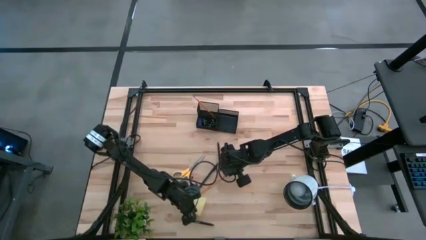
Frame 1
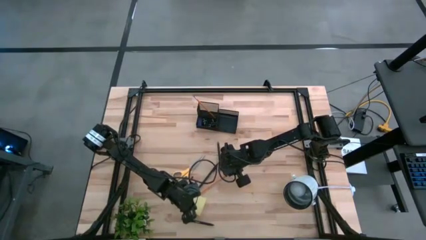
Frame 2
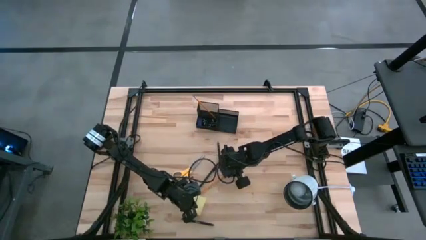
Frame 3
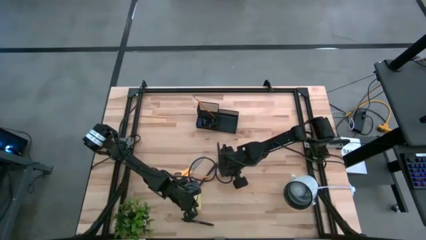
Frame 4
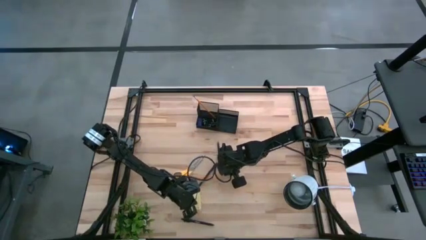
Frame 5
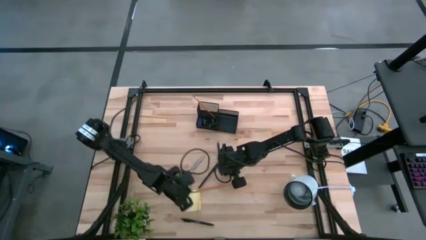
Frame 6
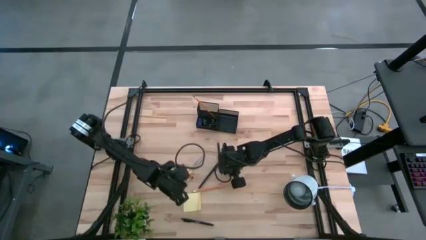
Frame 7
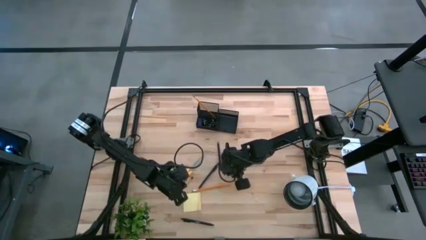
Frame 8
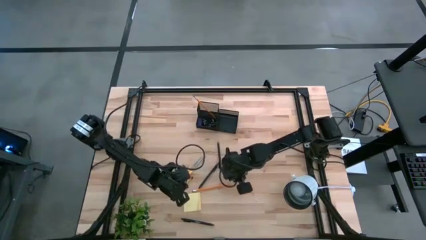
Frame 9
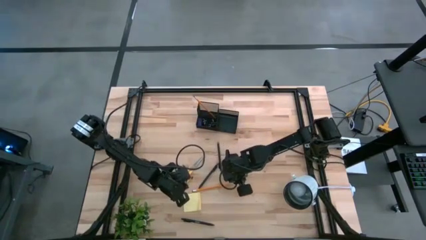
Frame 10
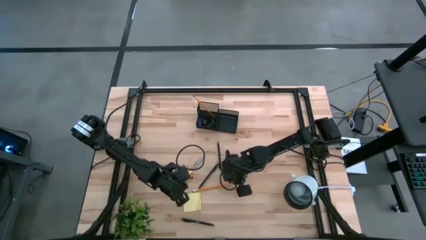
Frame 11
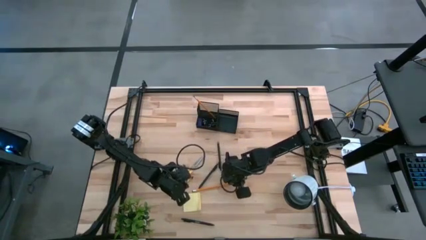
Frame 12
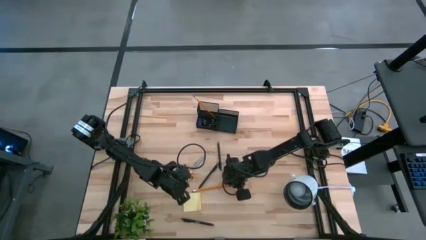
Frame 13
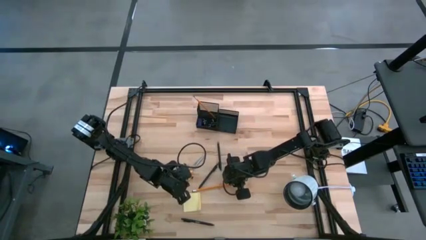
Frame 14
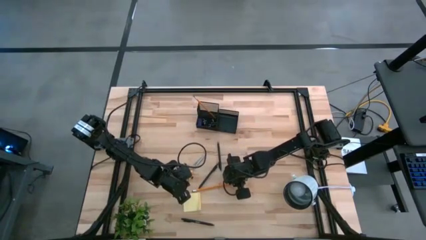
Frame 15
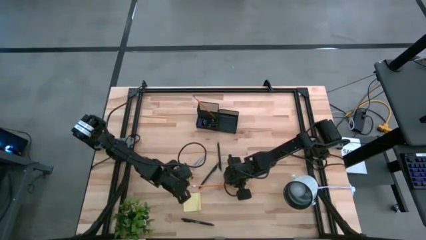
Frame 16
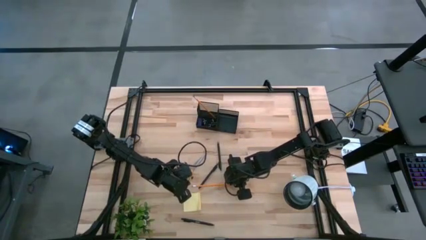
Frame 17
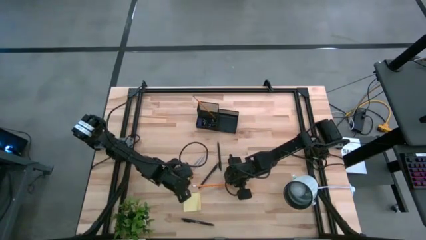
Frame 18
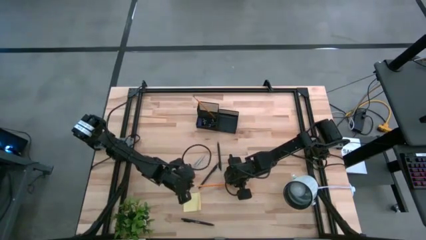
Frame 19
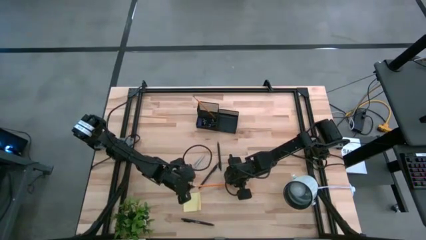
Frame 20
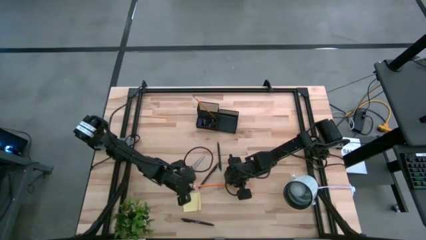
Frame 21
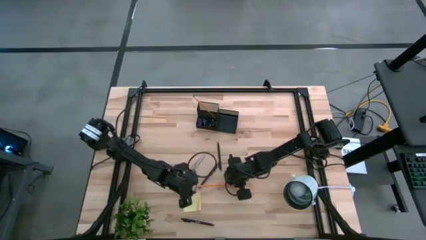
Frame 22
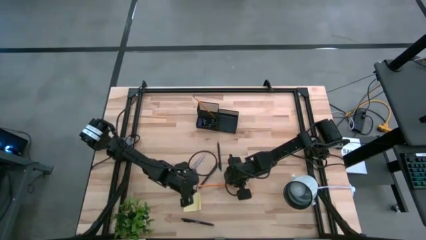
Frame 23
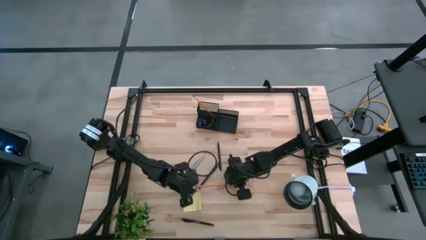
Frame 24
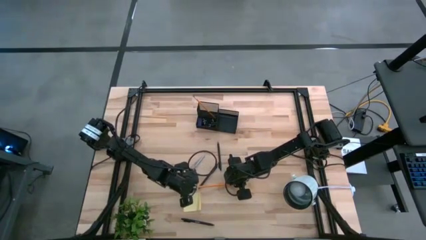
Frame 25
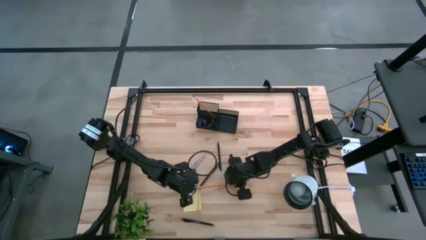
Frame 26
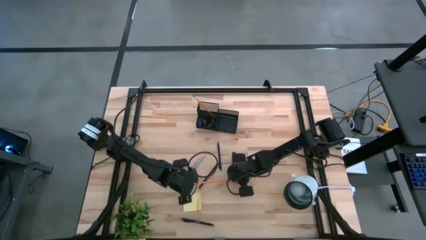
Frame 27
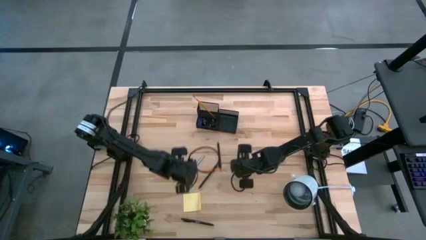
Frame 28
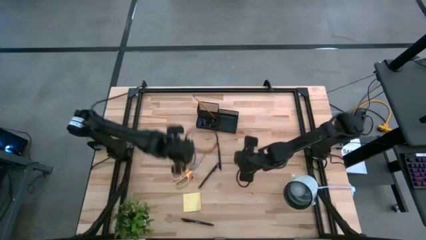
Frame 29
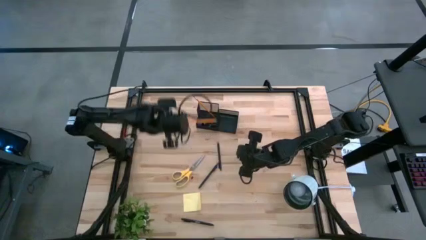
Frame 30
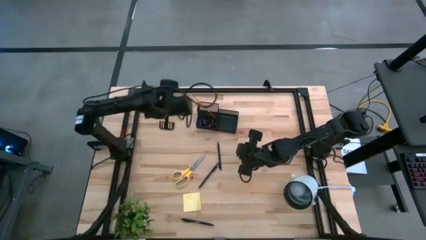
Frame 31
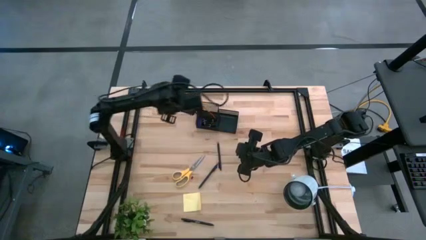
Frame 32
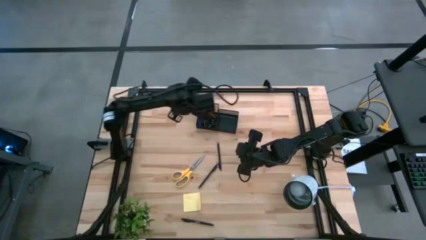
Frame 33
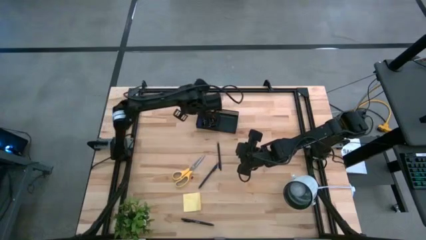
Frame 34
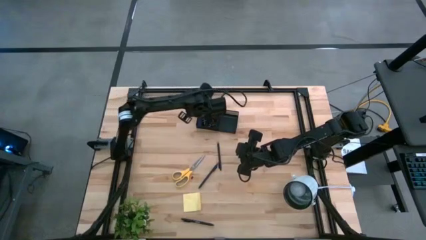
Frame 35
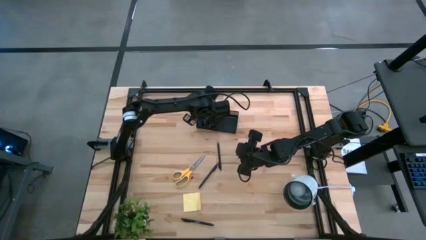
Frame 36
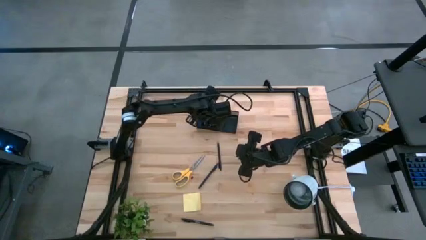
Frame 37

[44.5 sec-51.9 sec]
Task: Pick and place office supplies into organizer
Put the orange pencil into the desk organizer

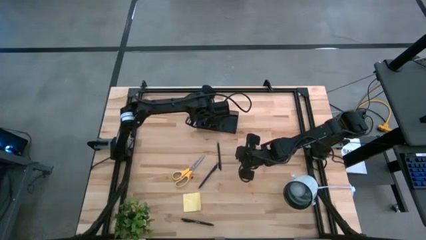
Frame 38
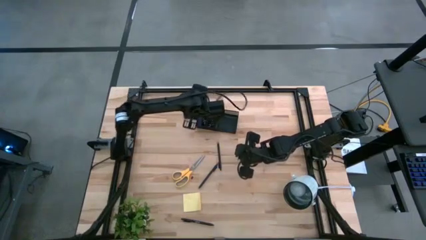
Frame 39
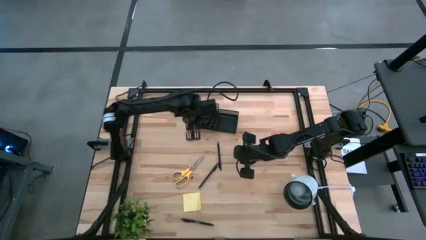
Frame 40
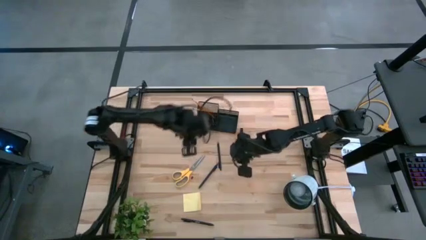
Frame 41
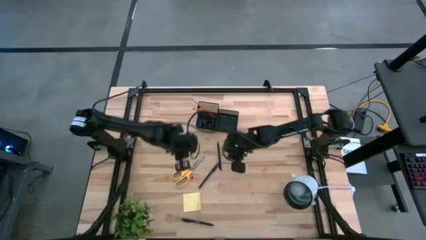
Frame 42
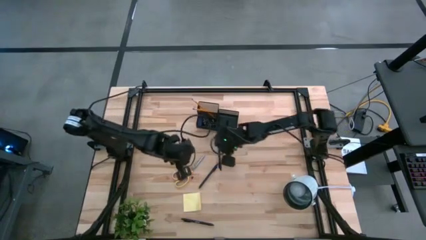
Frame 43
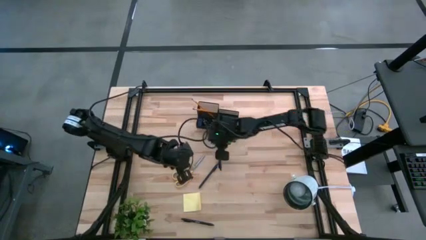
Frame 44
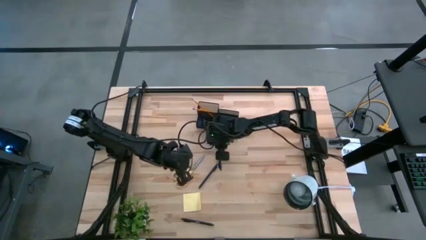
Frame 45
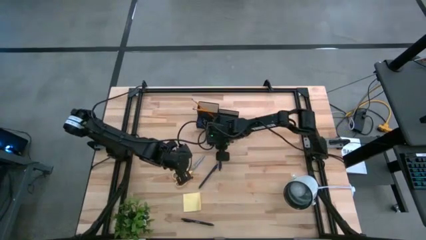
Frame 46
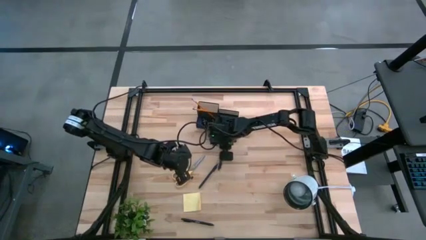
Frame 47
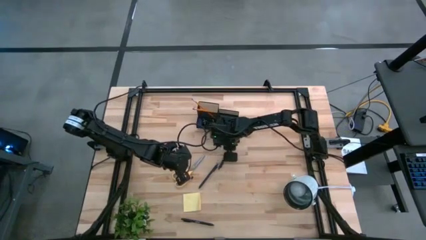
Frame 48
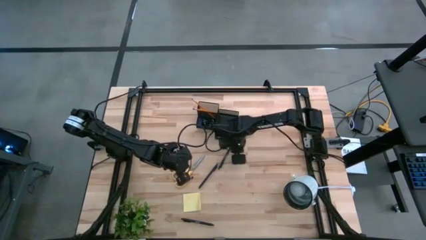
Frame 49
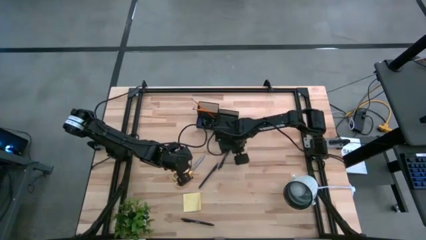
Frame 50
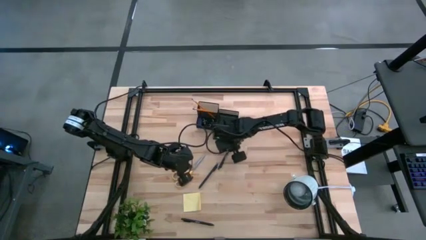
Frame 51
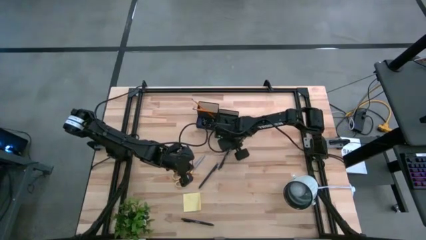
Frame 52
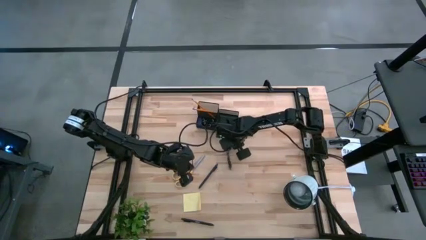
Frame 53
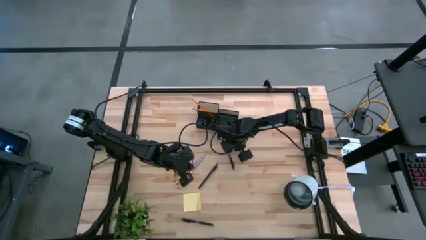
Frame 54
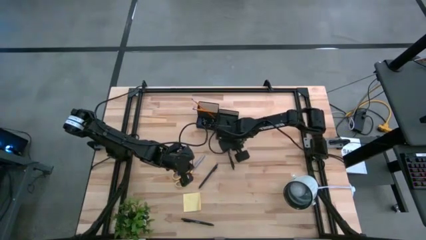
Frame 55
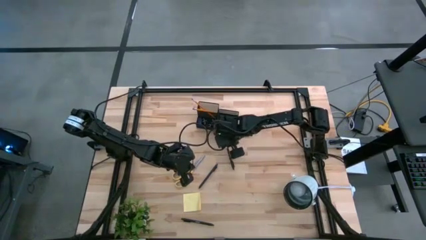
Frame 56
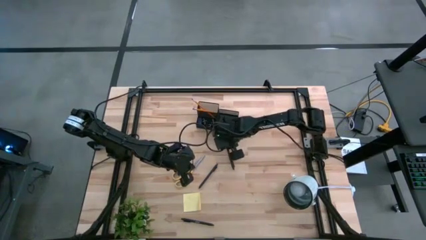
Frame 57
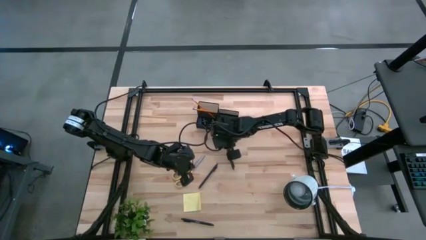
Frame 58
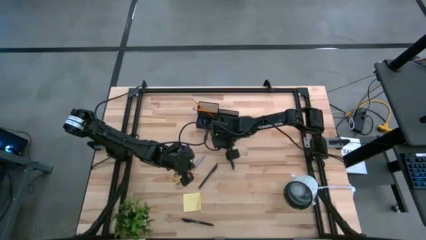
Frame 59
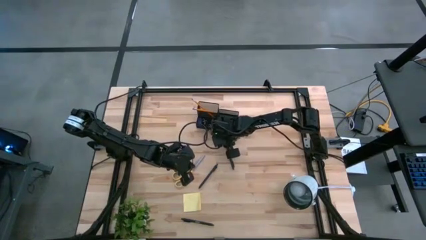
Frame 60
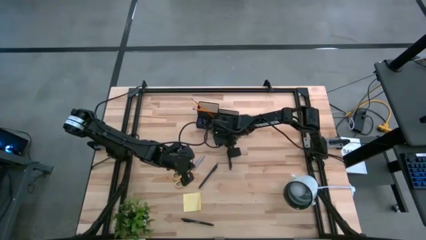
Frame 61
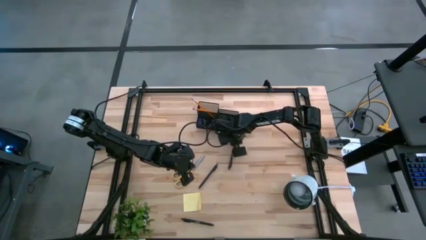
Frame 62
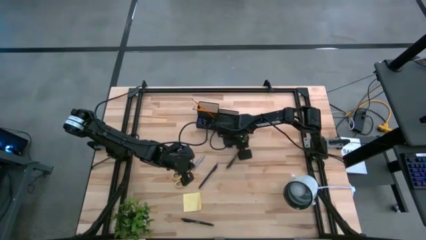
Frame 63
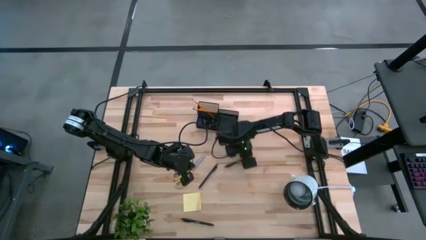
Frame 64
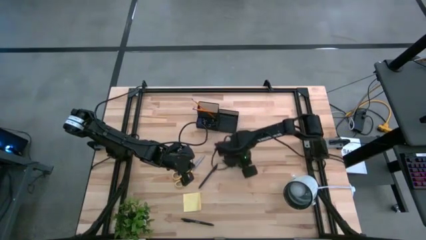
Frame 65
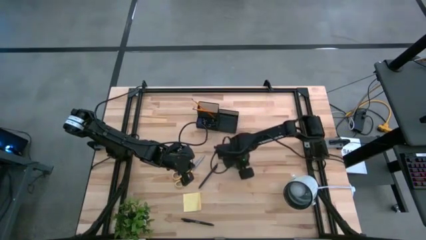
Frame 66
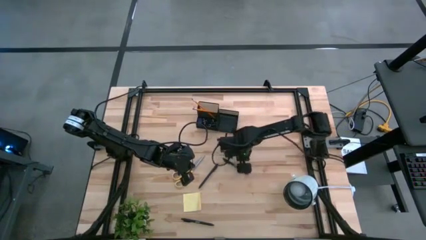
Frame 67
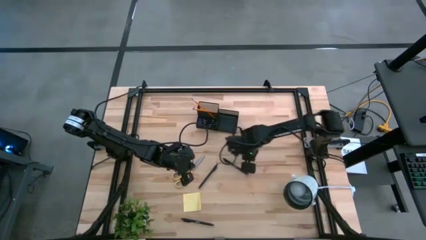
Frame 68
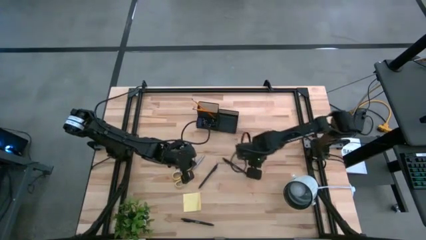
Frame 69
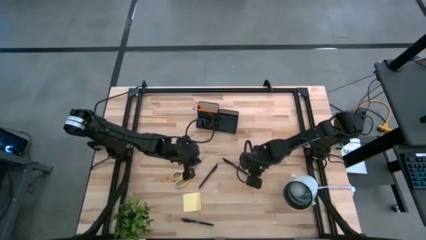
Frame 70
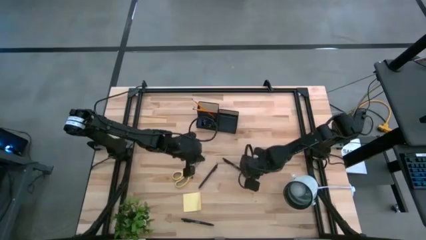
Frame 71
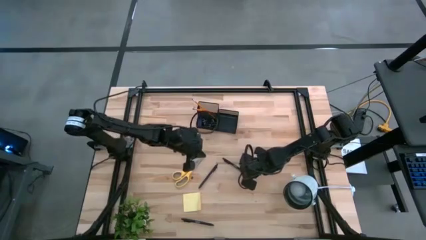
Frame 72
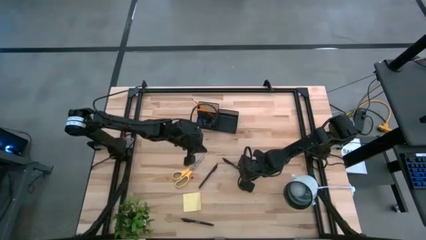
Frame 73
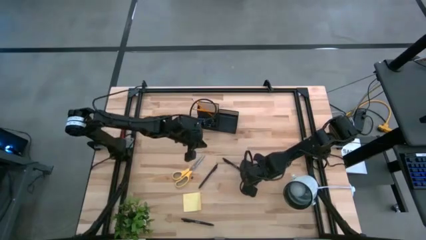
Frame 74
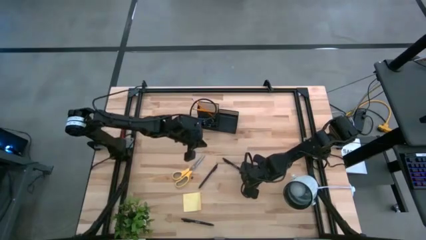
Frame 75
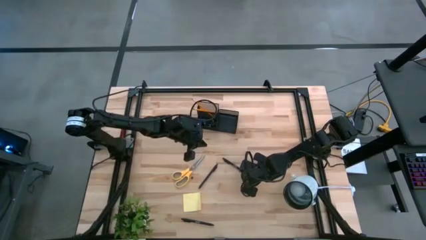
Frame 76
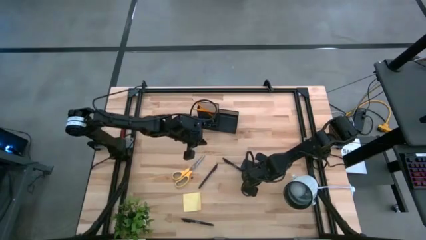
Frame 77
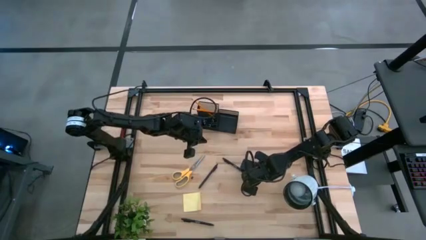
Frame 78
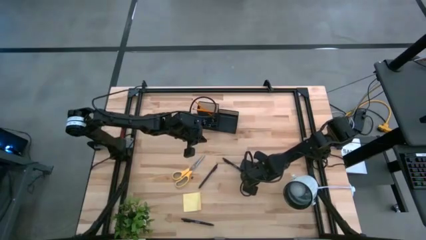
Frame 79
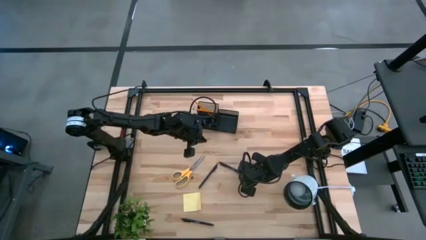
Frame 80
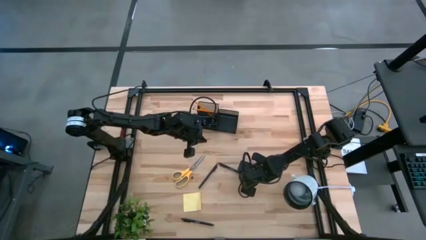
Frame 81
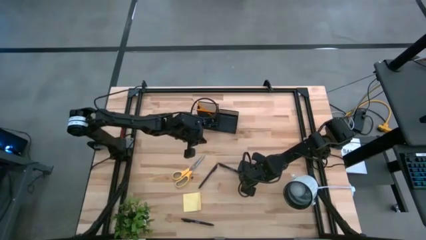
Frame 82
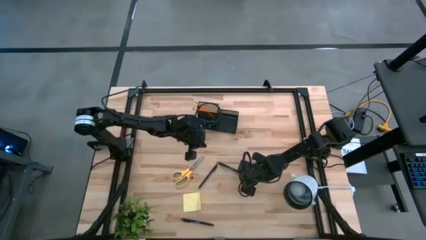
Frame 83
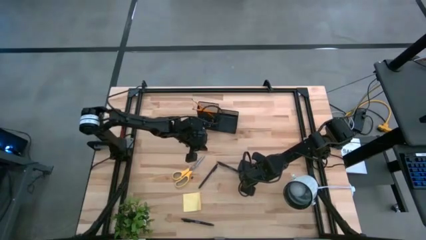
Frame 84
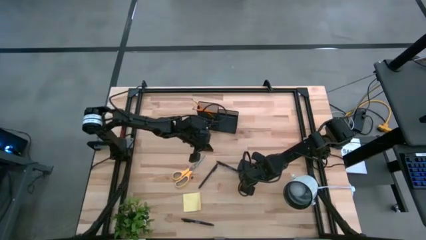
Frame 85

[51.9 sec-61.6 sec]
Put the top black pen into the desk organizer
